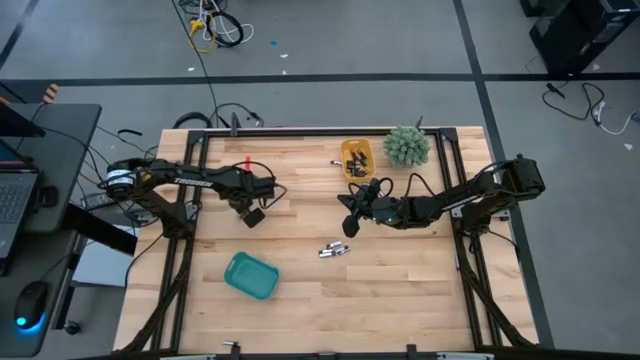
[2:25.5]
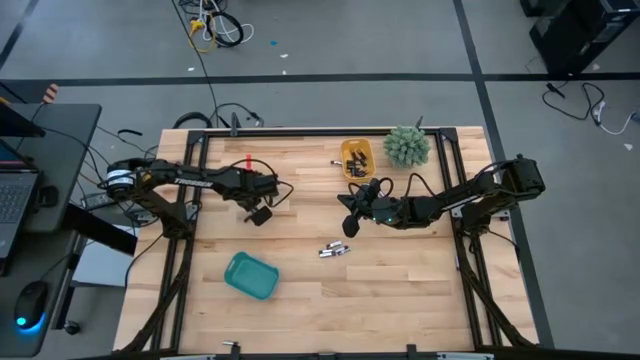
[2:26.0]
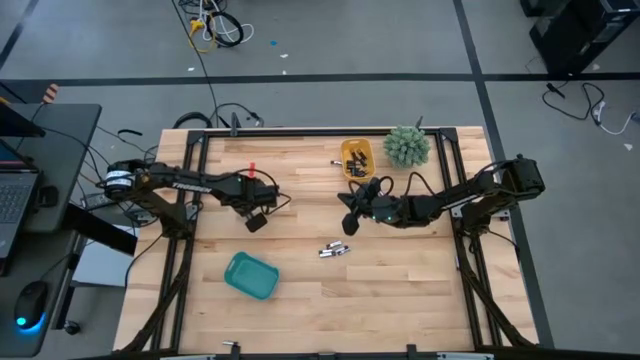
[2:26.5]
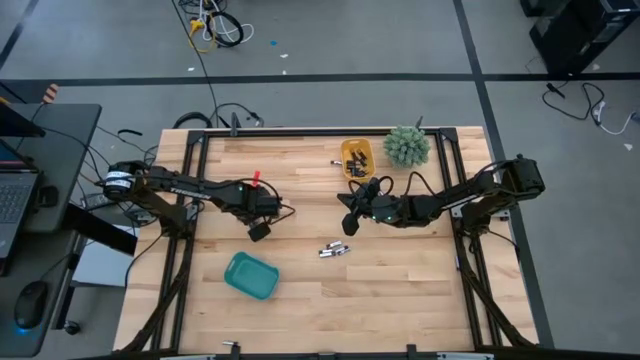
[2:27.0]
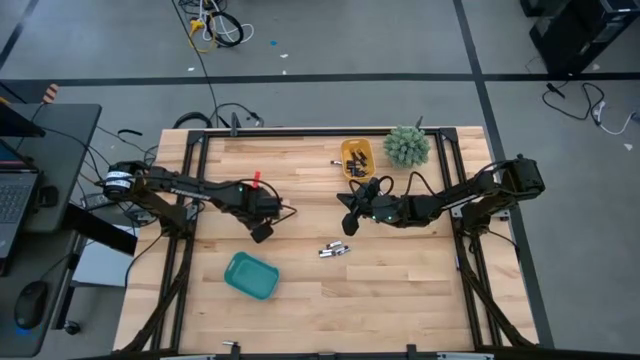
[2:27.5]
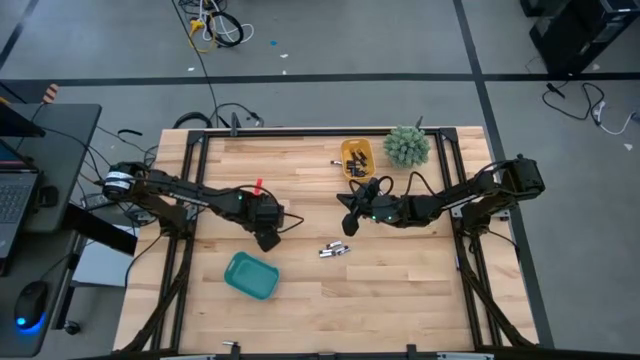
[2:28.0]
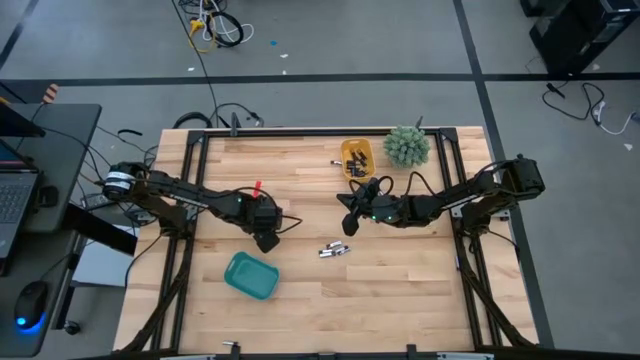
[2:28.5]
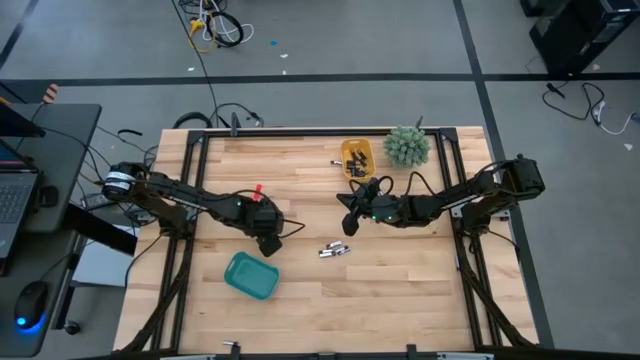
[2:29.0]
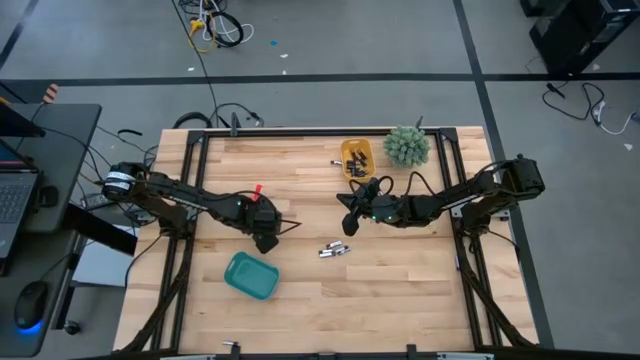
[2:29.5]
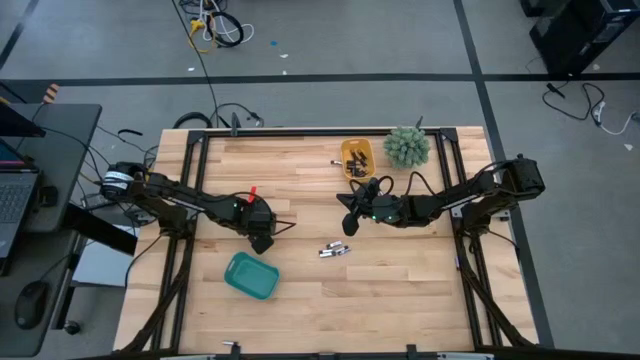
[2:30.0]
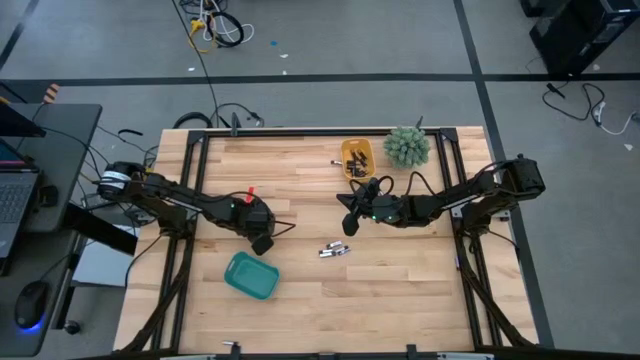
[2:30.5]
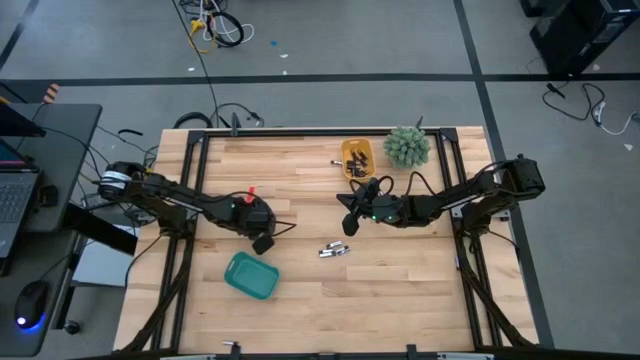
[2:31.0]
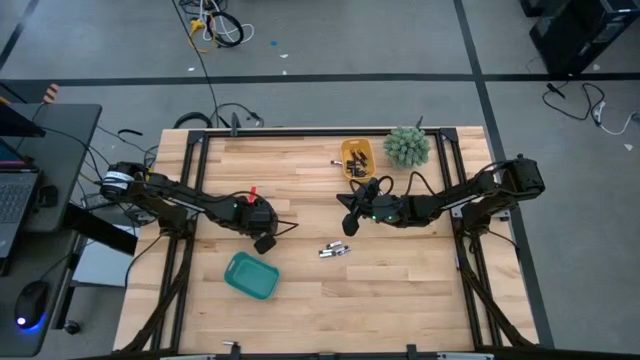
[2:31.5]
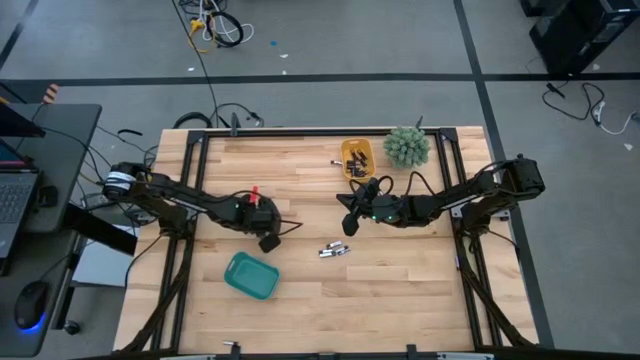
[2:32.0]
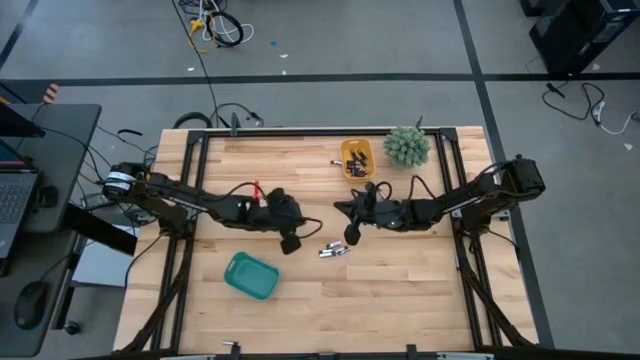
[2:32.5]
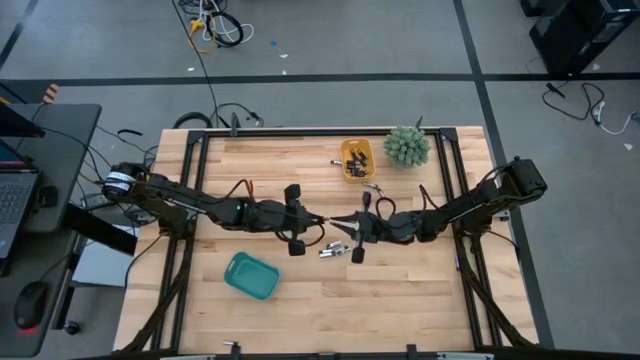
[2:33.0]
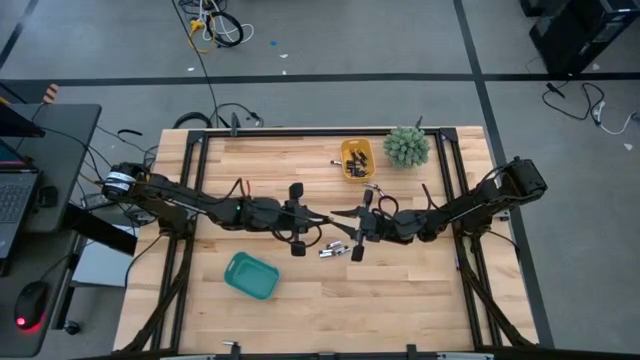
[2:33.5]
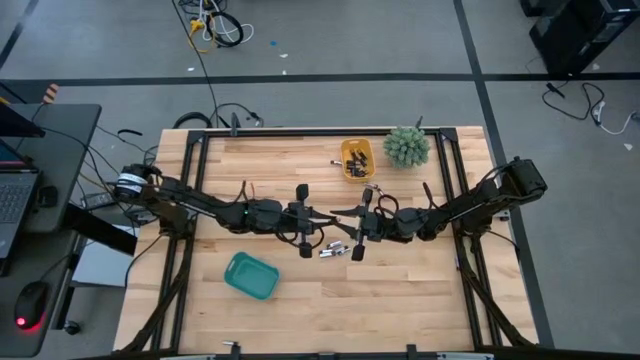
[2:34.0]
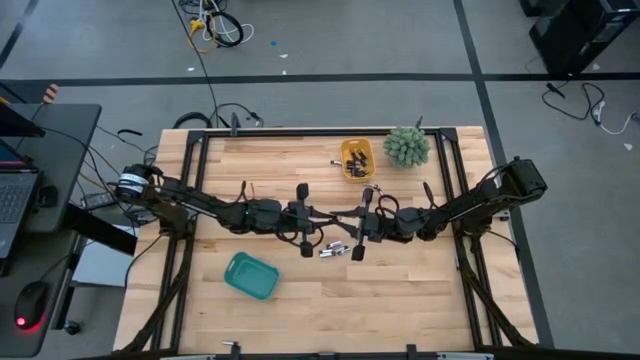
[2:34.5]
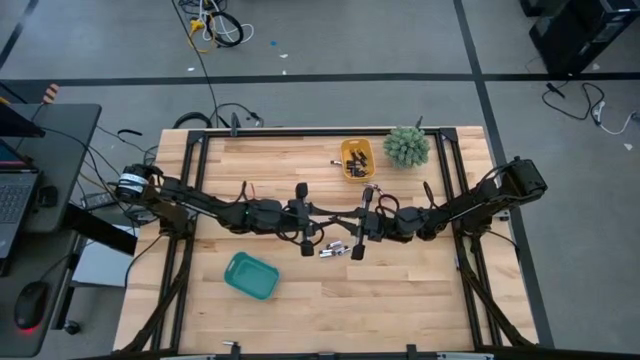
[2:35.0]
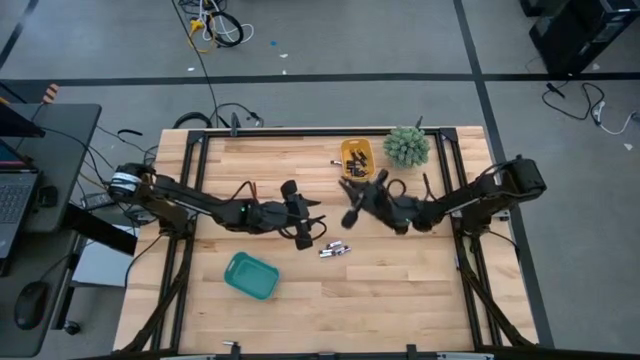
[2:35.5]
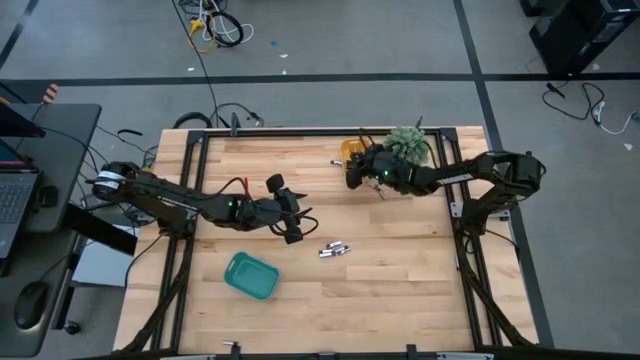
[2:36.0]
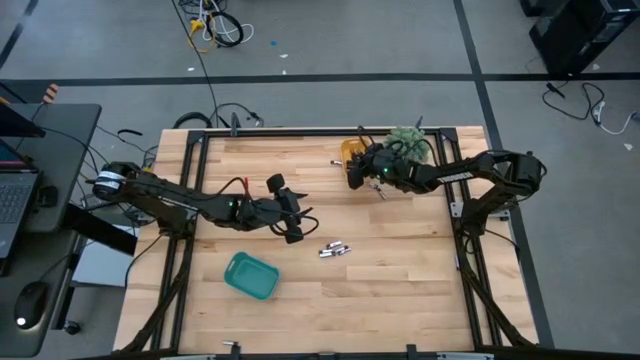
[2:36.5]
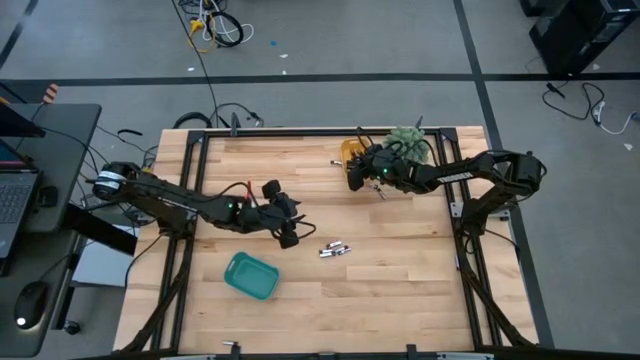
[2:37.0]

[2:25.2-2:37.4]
Task: Sort batteries
Put the black battery into the yellow bin

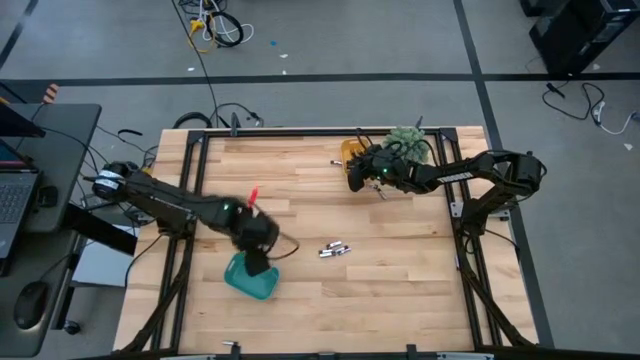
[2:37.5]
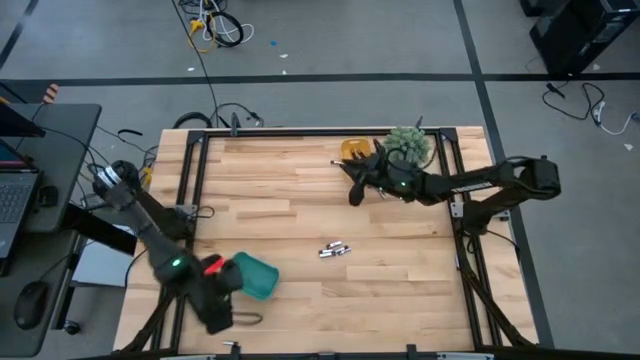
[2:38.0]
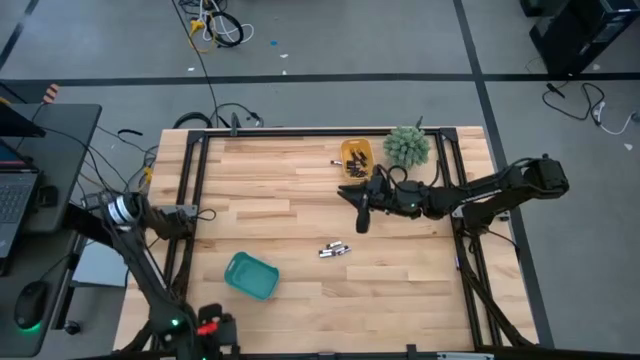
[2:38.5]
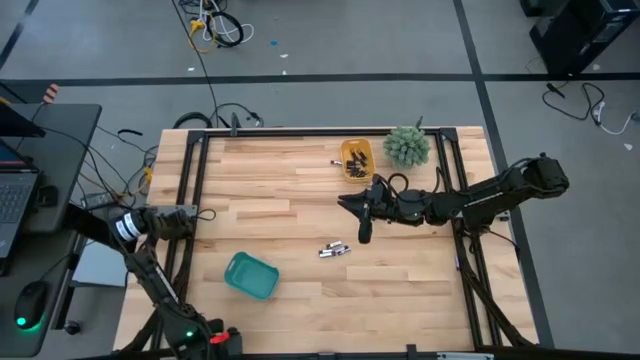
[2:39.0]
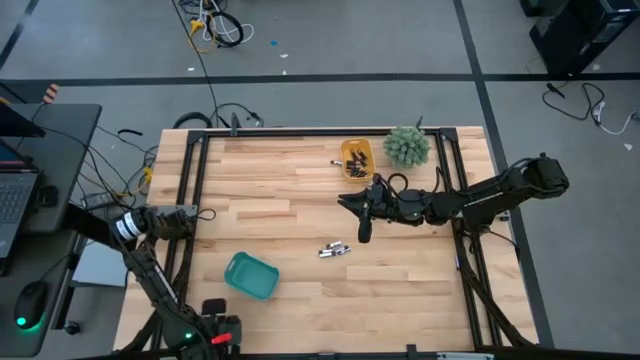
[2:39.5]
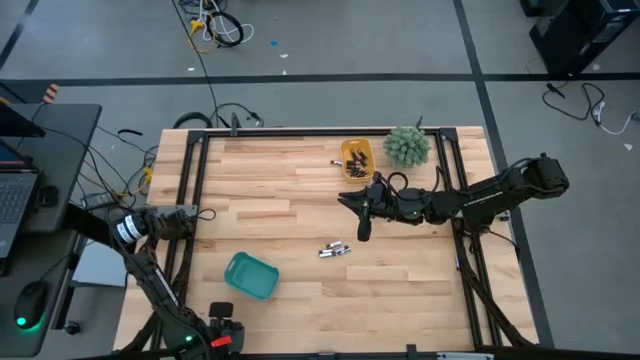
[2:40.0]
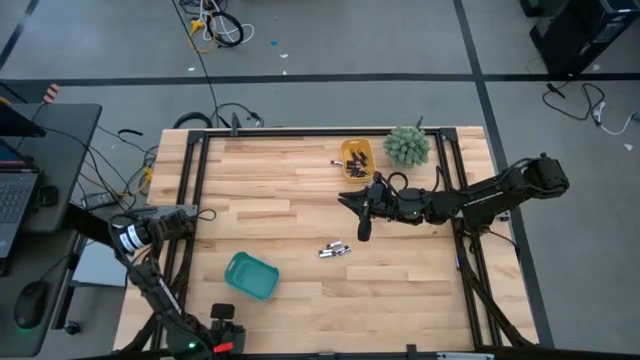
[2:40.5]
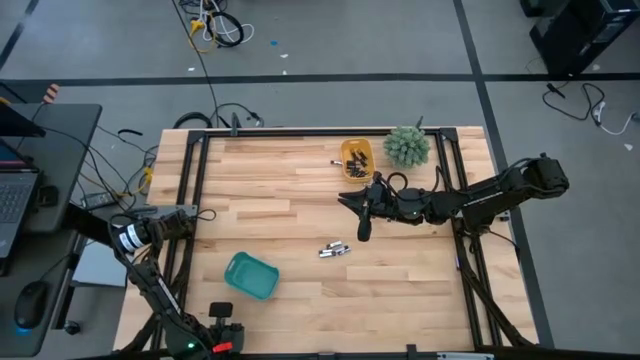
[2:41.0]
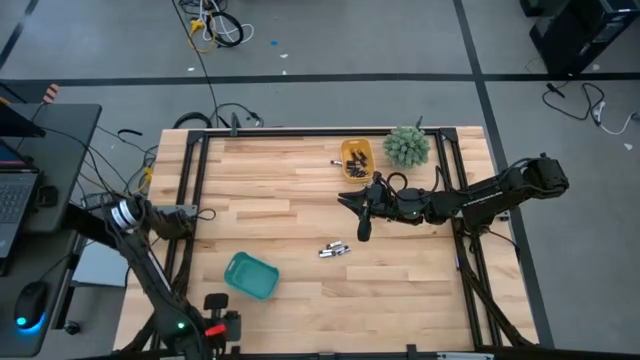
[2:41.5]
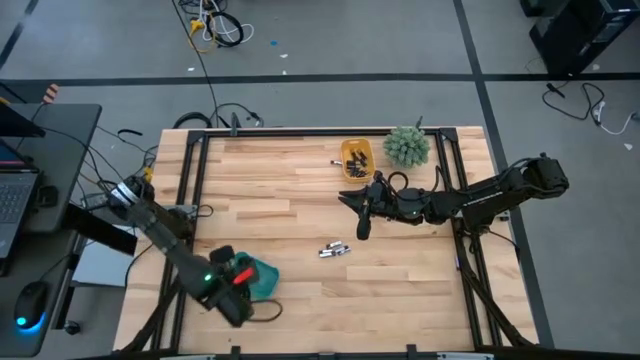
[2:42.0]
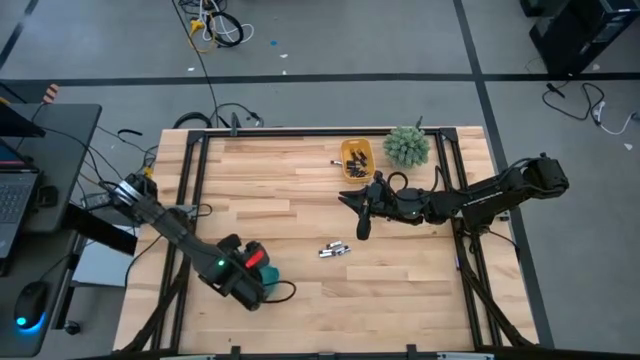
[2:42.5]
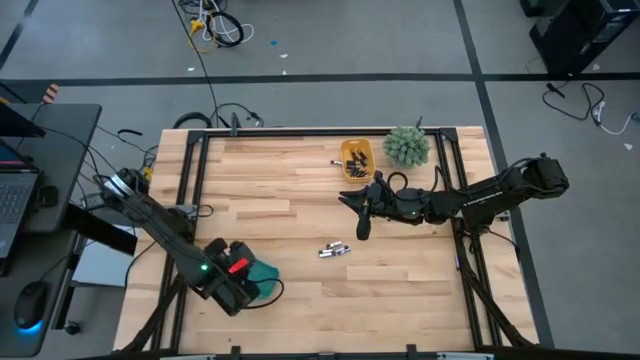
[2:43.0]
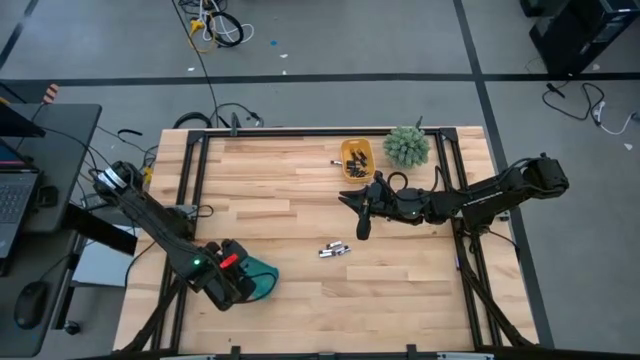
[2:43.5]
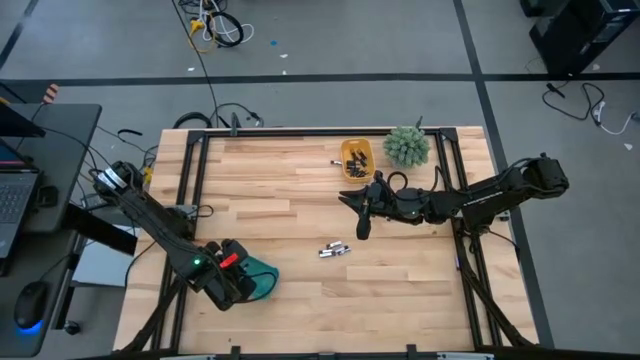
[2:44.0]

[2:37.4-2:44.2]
Put the silver battery into the green bin

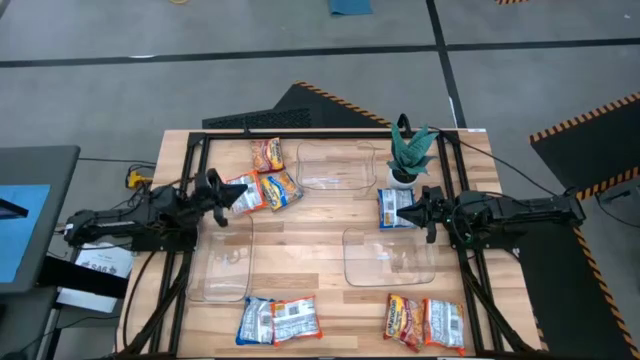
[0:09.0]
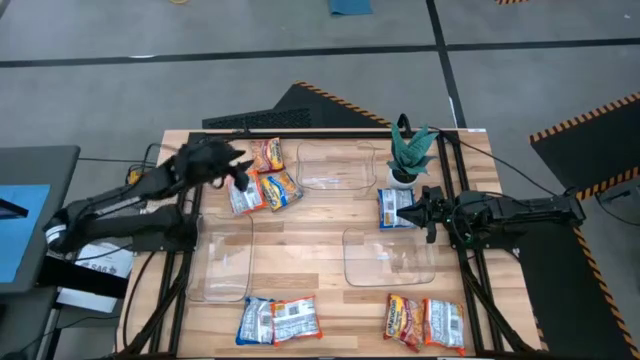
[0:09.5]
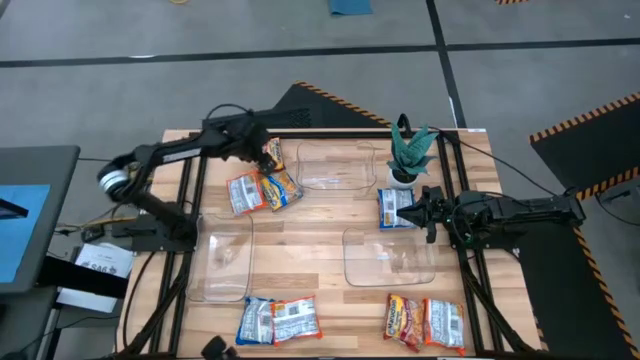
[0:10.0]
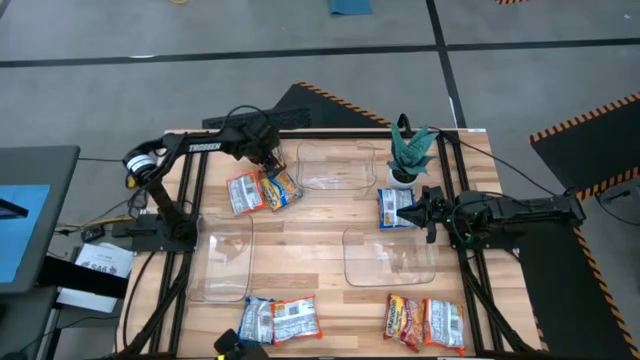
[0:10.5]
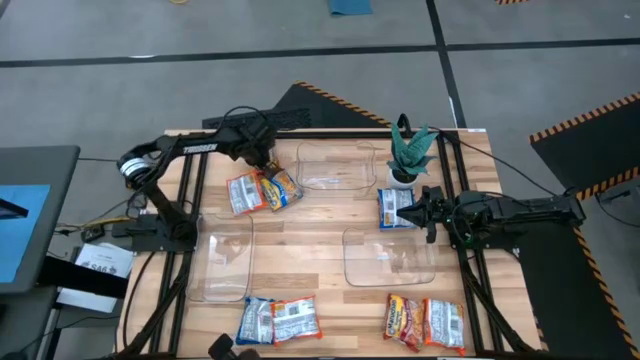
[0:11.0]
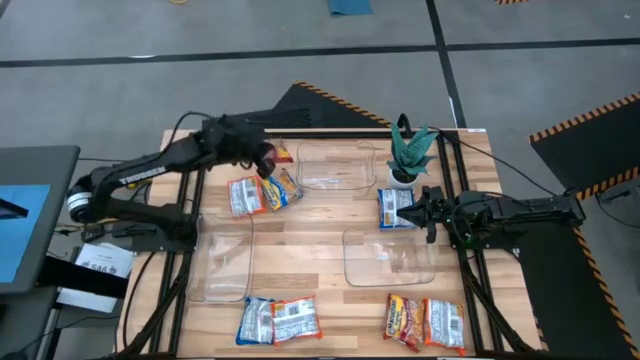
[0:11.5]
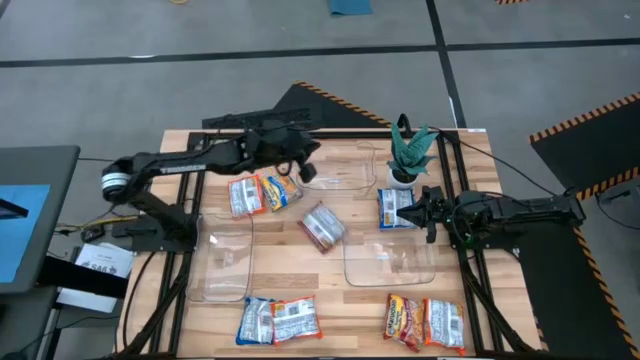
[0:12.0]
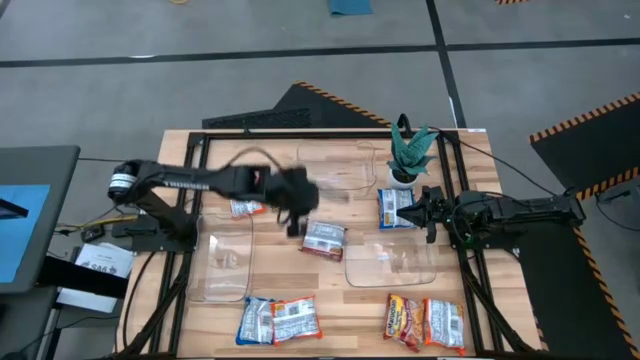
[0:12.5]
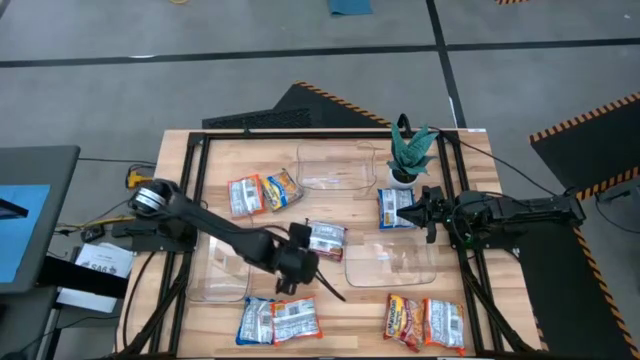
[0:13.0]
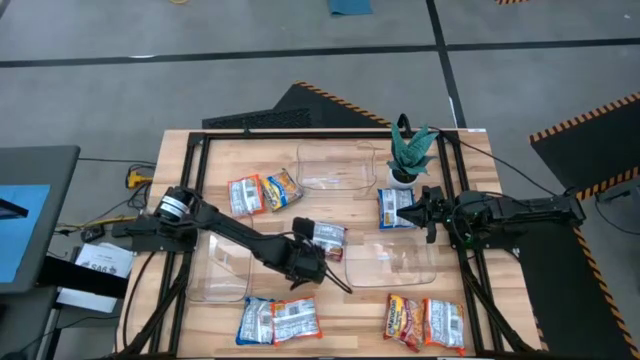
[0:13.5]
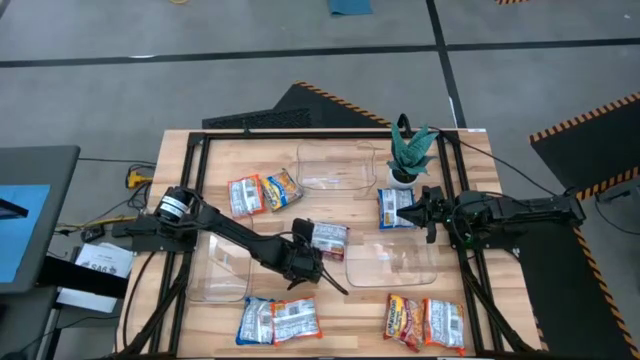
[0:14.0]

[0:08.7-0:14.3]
Task: Sort Maruchan noodles
Put the top left red bag into the top transparent bin
